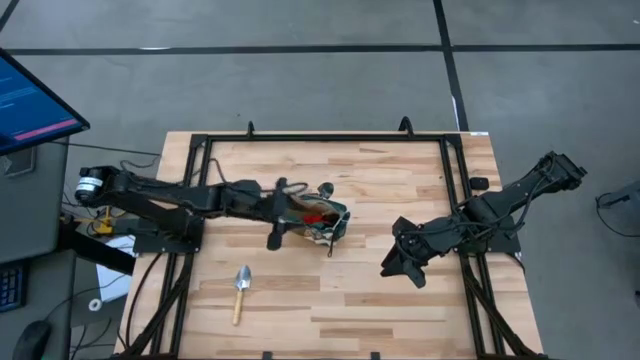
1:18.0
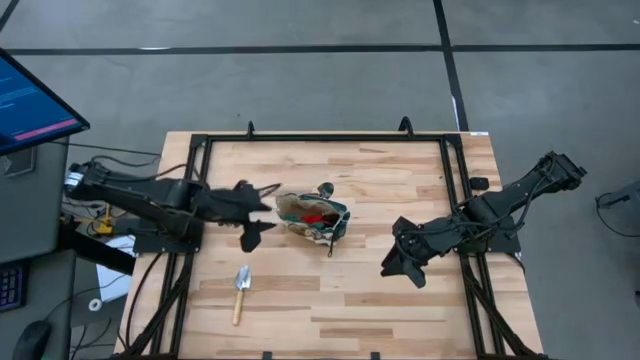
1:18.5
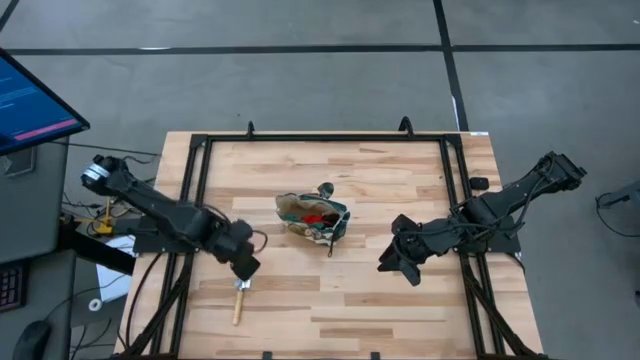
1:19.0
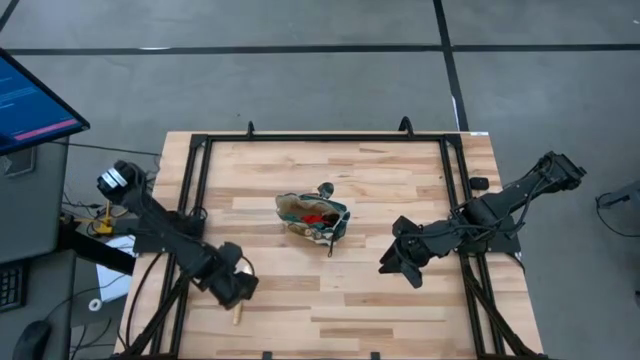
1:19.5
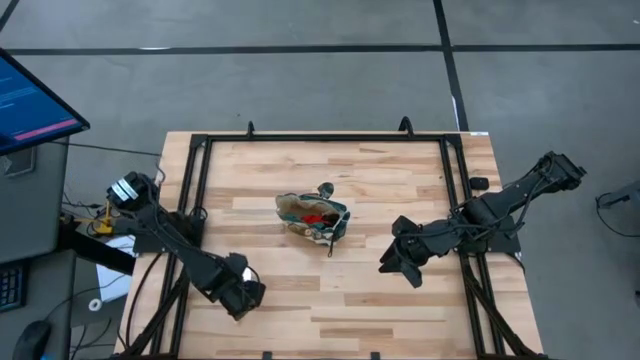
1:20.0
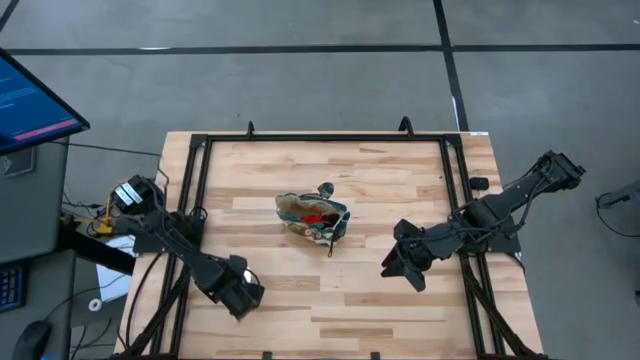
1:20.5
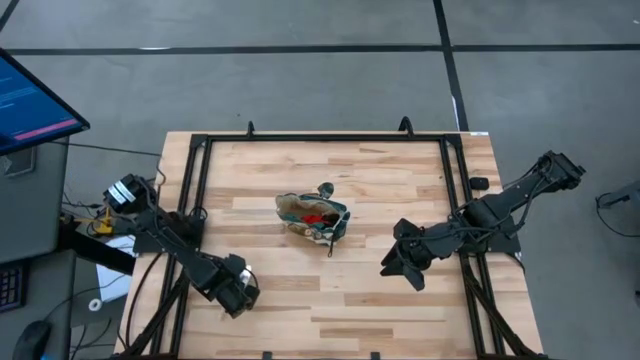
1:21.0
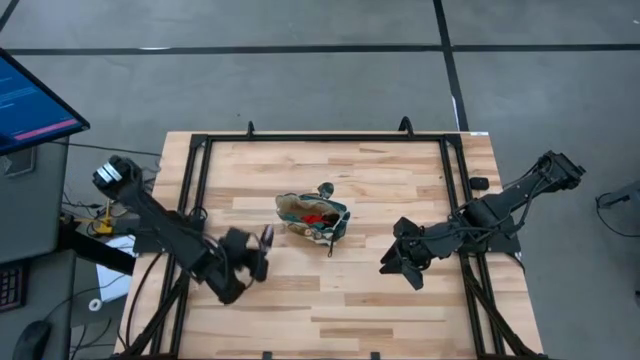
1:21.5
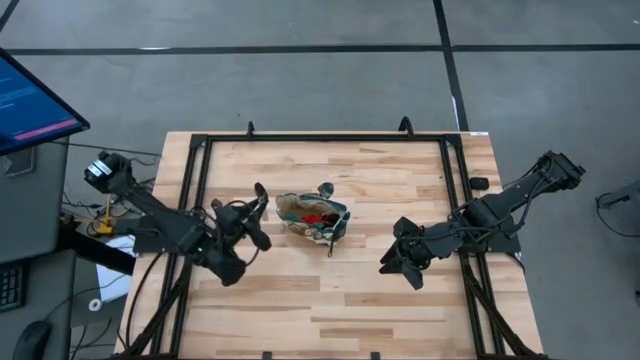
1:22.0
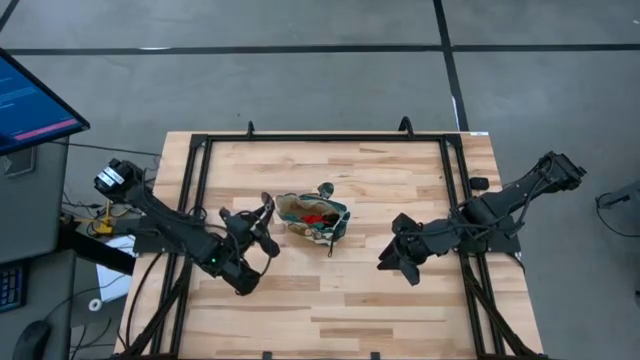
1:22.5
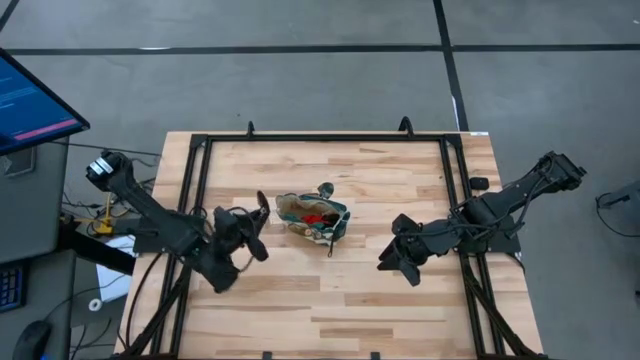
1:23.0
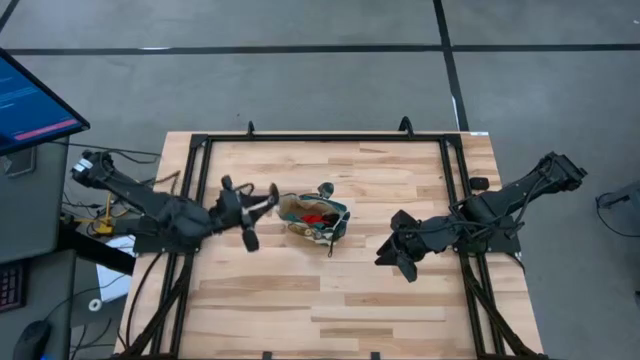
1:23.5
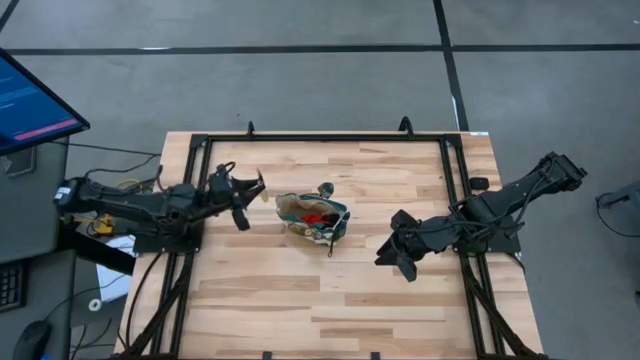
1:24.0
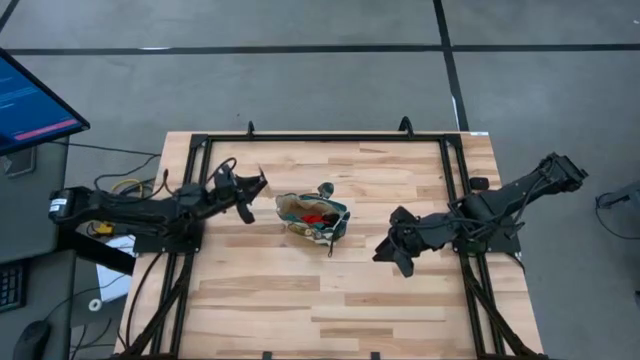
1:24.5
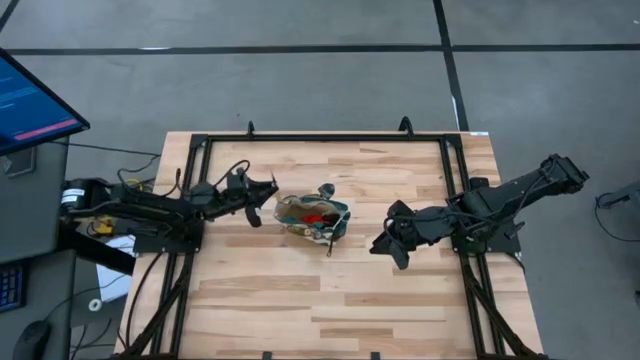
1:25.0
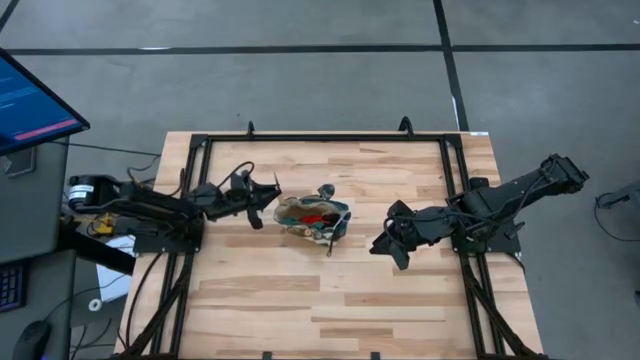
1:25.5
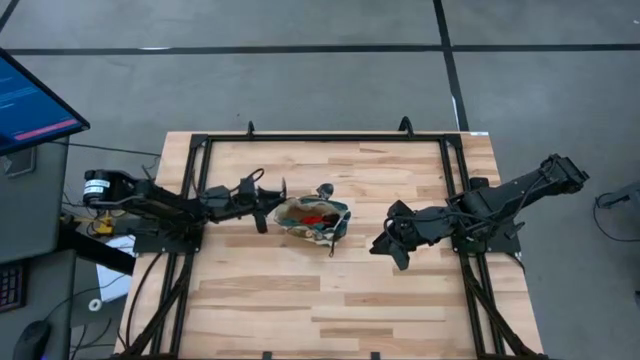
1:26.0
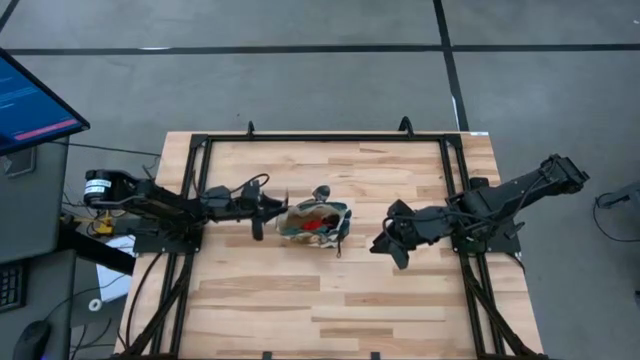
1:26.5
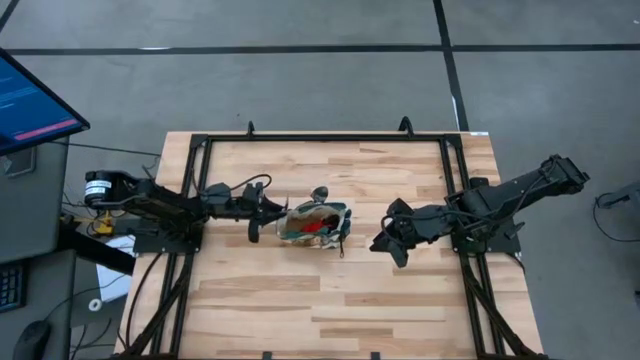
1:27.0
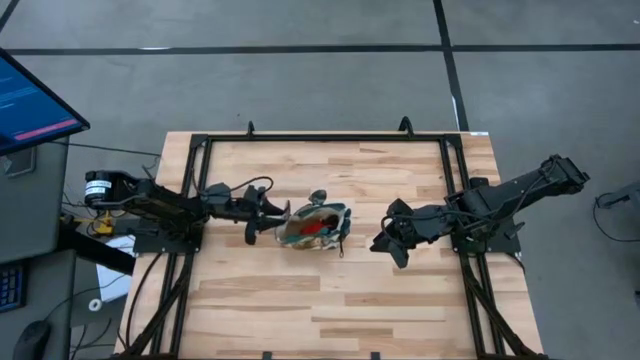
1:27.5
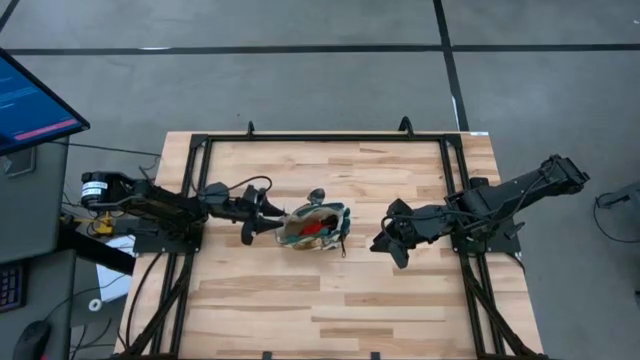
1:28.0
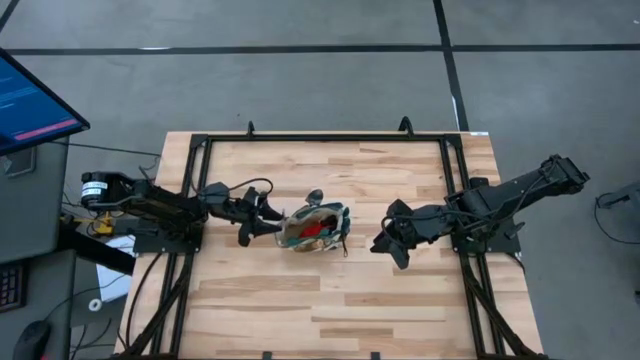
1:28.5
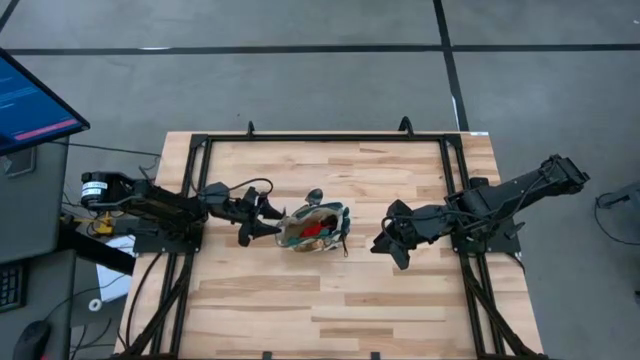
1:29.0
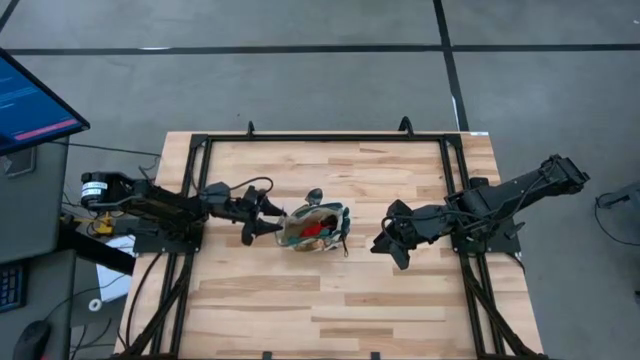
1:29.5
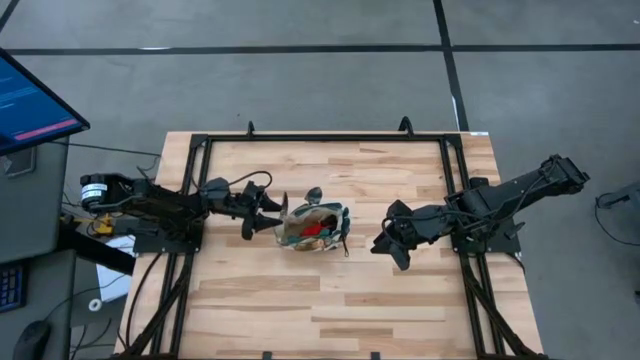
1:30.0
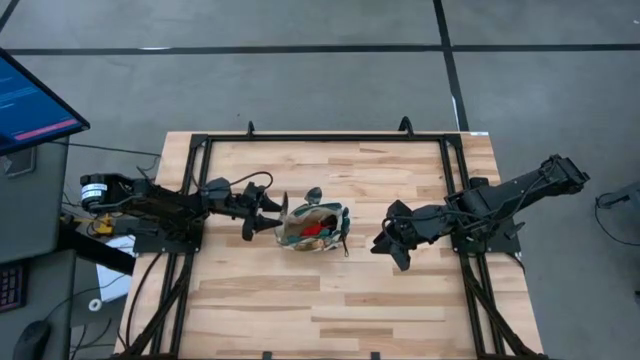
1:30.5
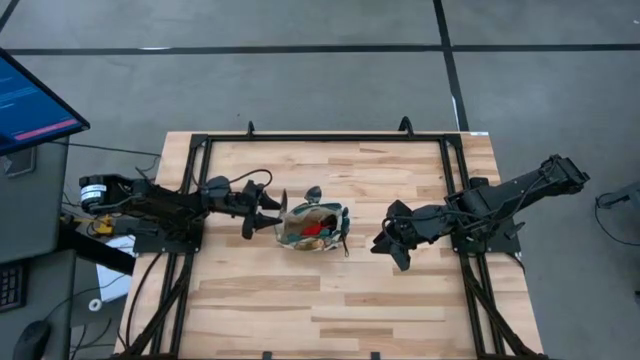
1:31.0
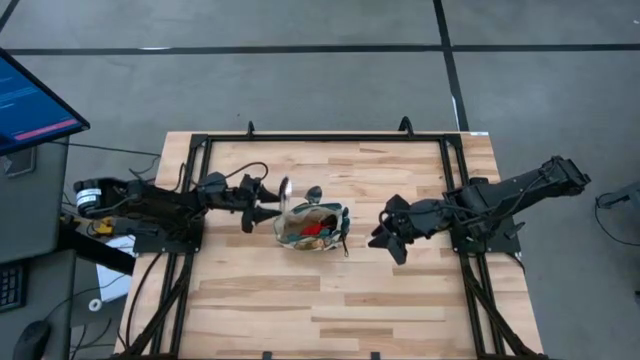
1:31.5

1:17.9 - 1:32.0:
Task: Pick & Place Garden tools in Gardening bag
Put the brown trowel into the gardening bag

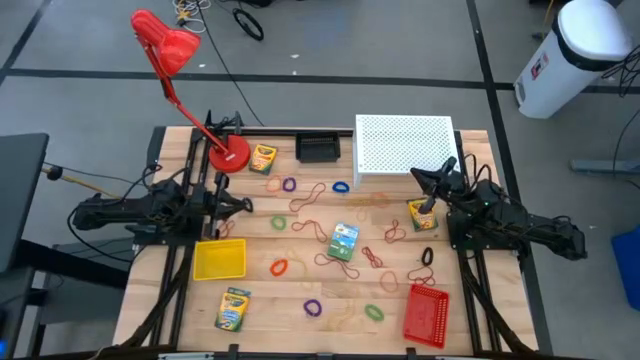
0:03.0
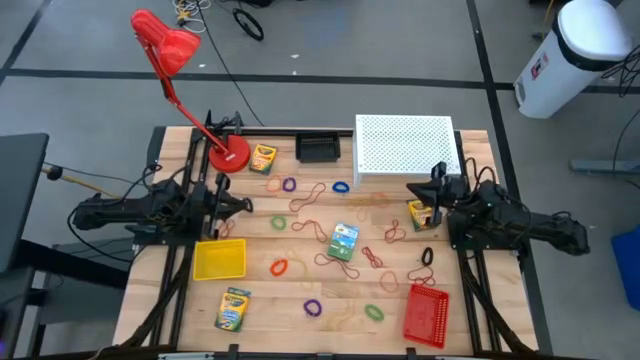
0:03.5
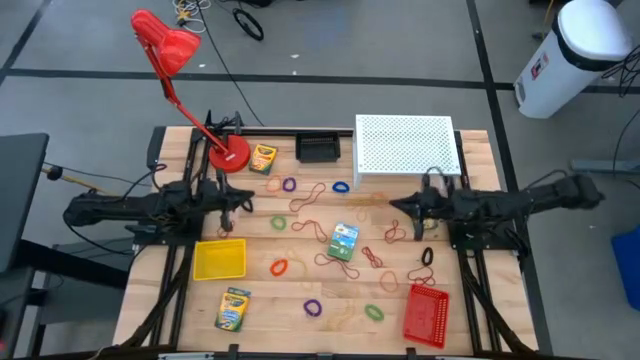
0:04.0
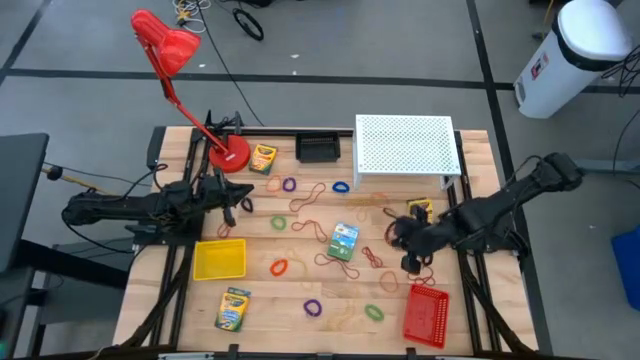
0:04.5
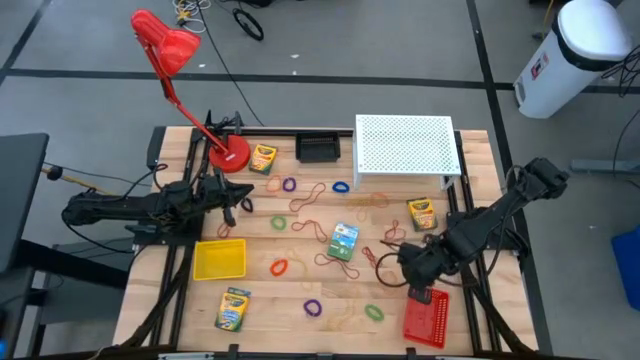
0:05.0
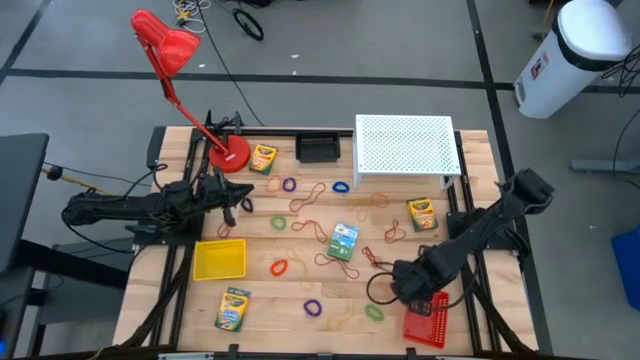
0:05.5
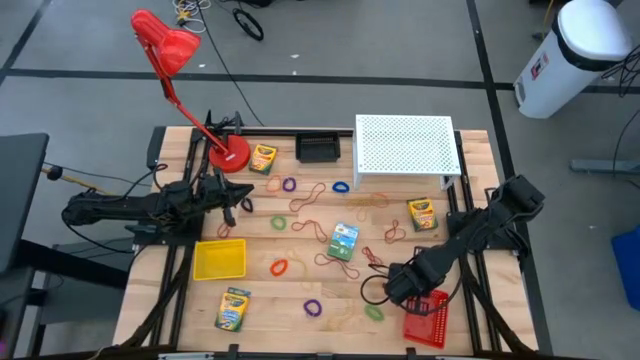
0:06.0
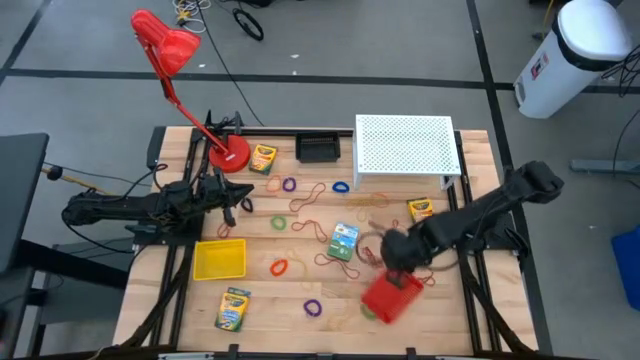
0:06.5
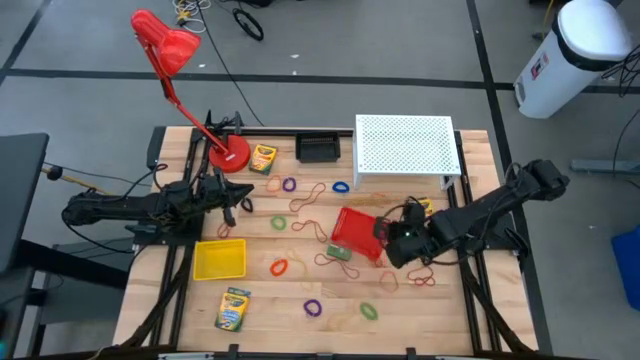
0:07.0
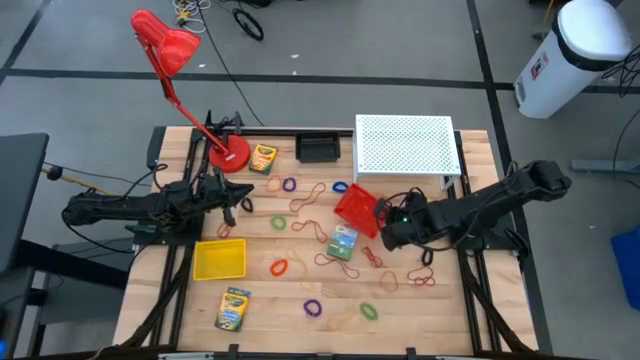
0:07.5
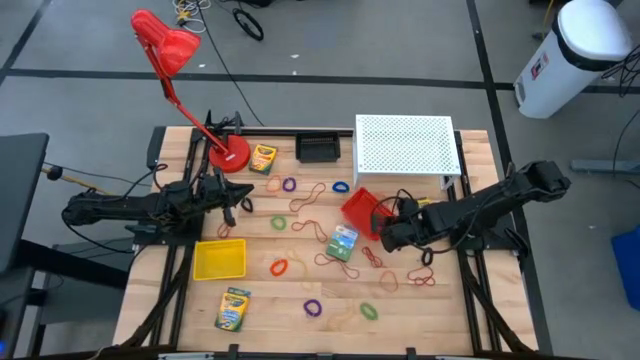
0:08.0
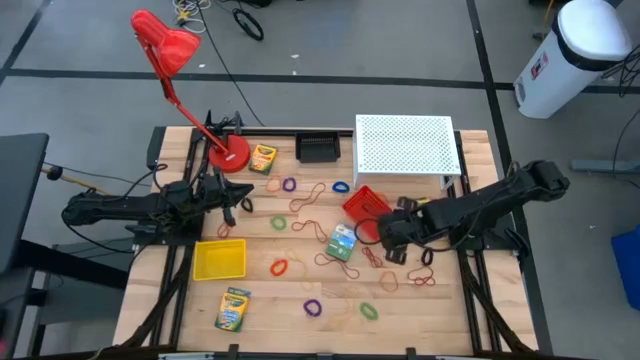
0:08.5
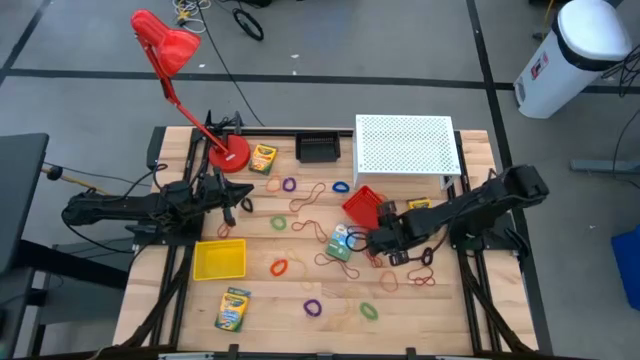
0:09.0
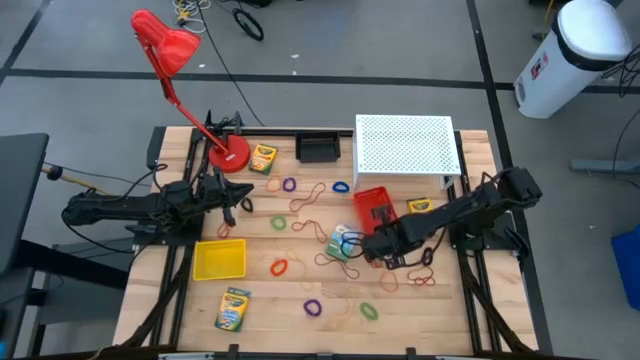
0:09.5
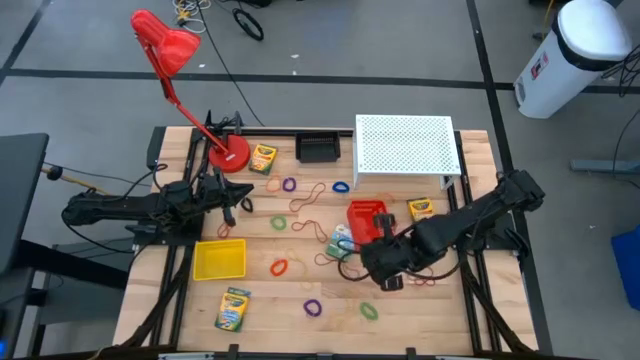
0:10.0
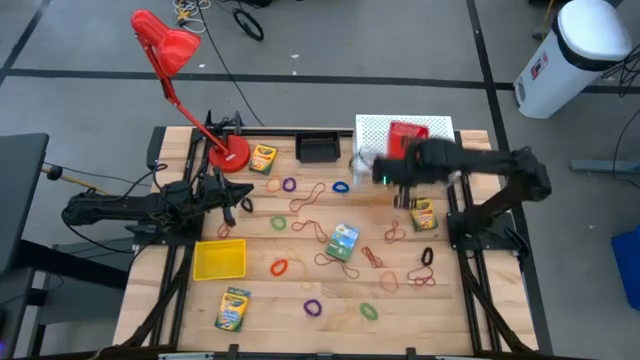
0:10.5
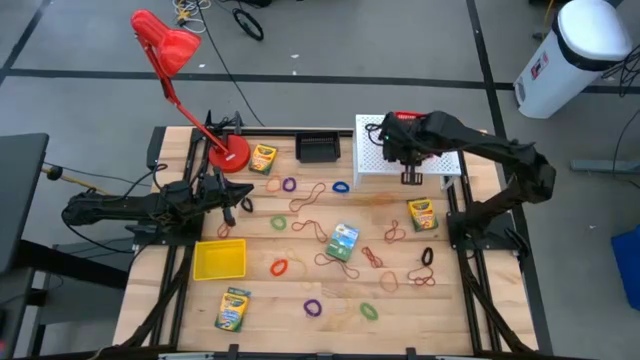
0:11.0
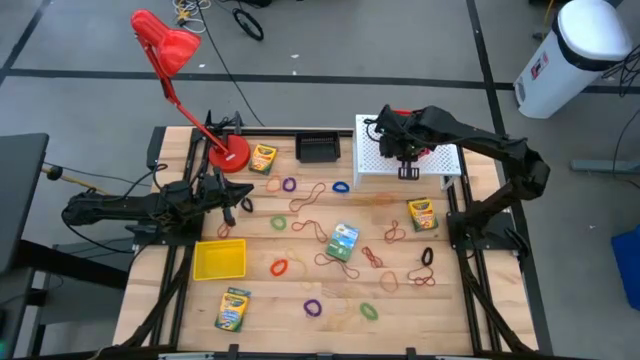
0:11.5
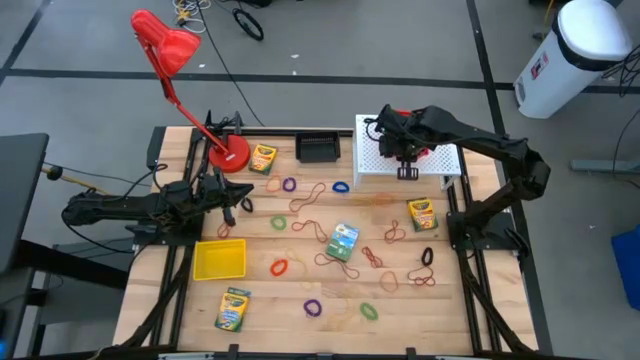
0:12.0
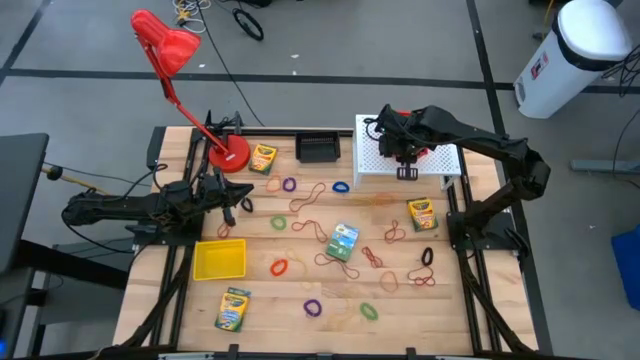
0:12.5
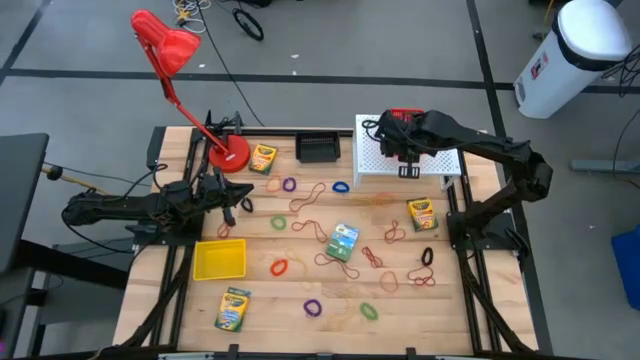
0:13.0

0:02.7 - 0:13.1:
Task: Pick & Place Office Desk Supplies
Put the orange basket on the shelf
